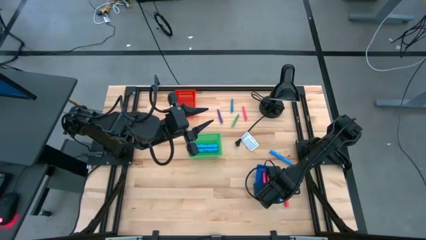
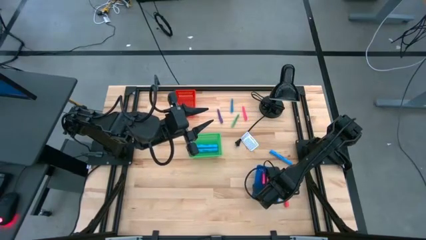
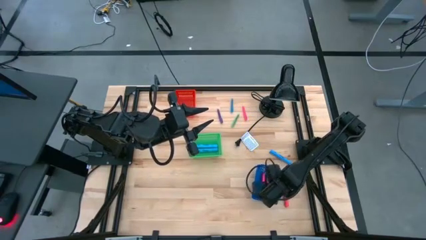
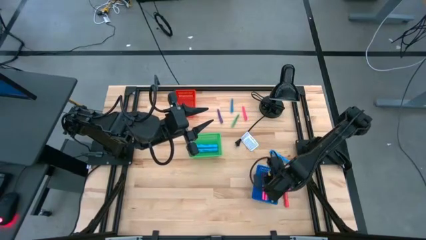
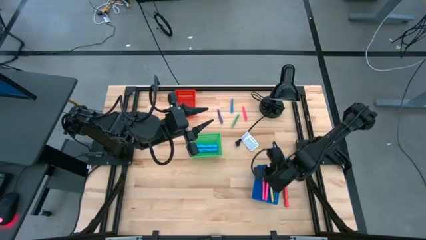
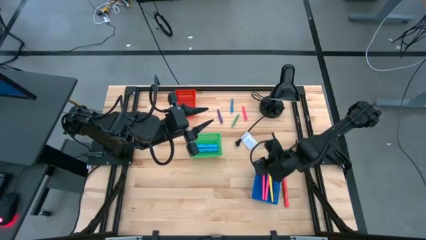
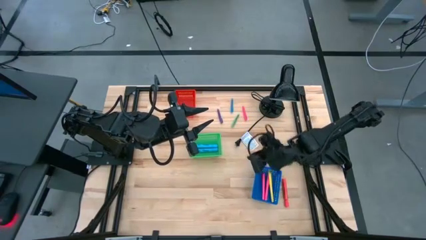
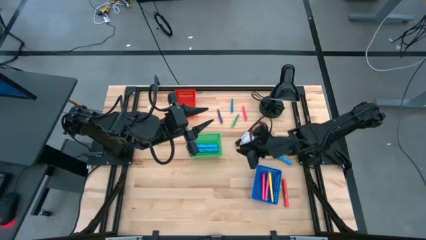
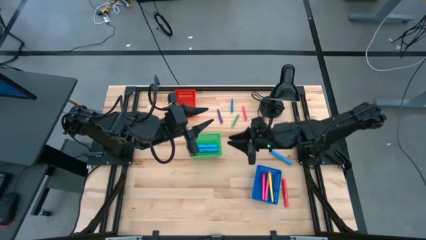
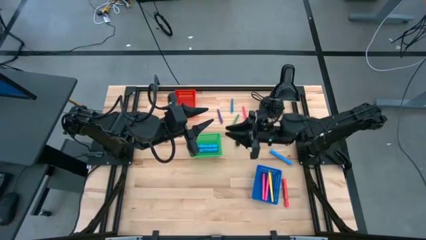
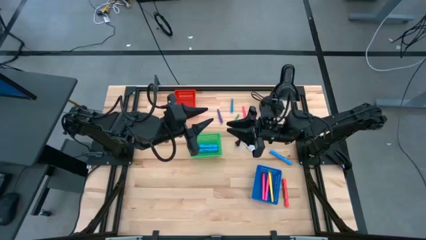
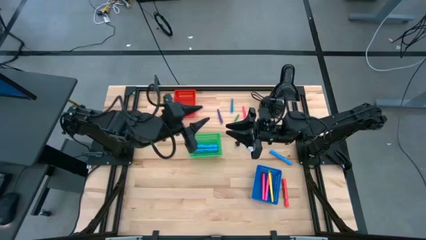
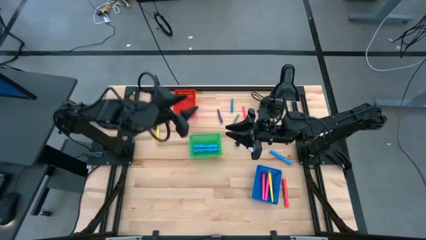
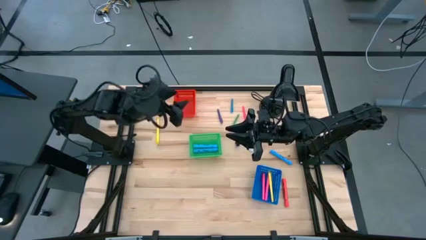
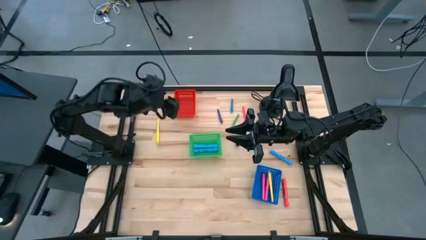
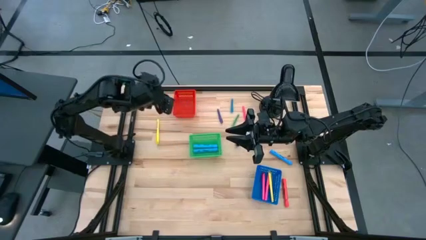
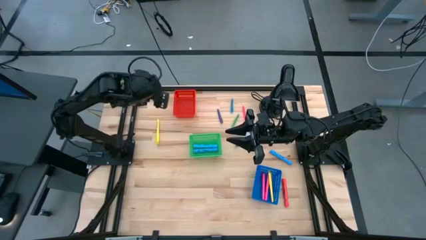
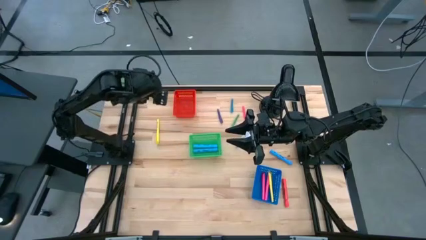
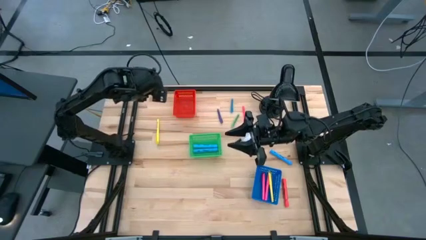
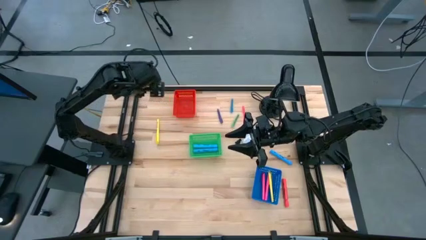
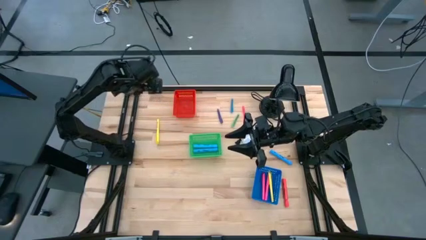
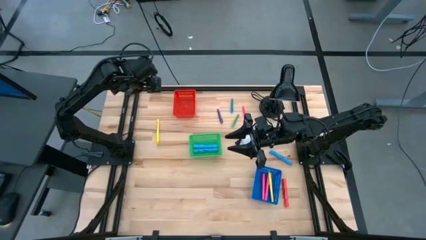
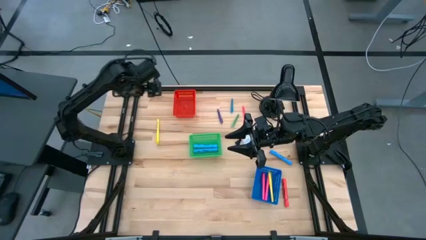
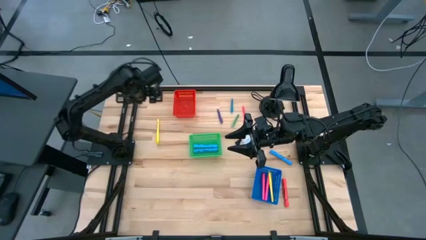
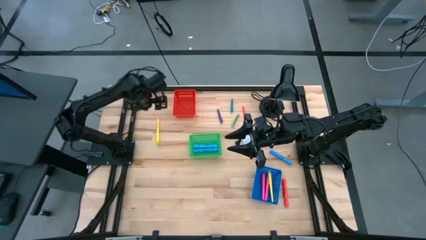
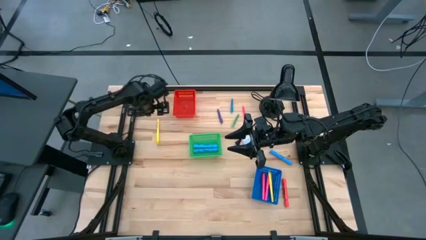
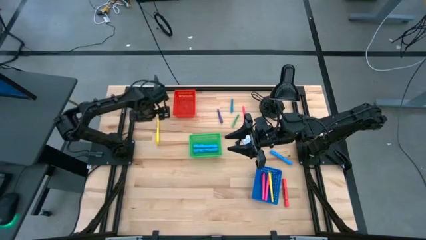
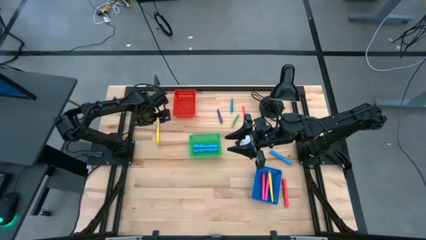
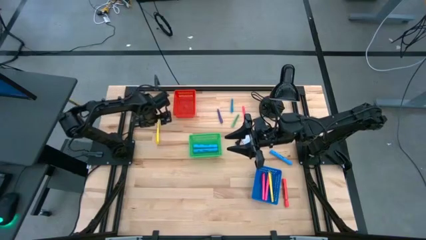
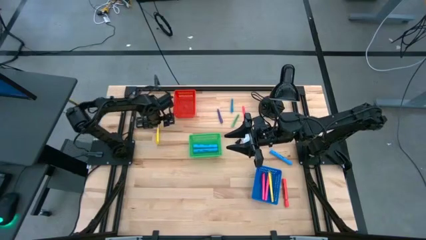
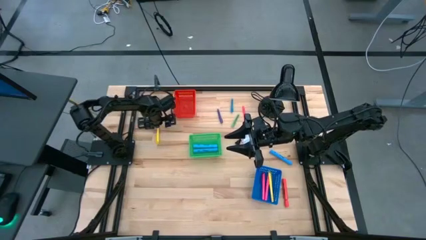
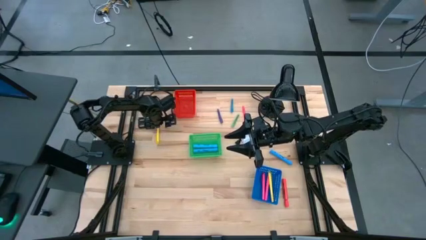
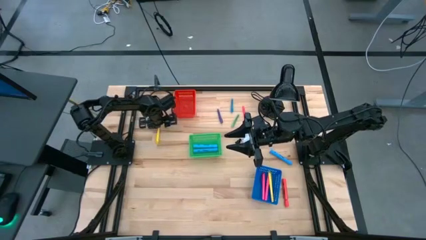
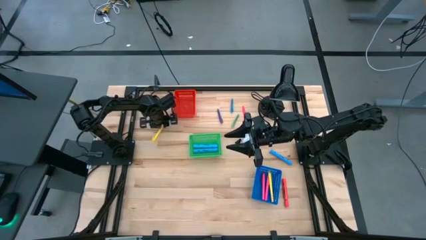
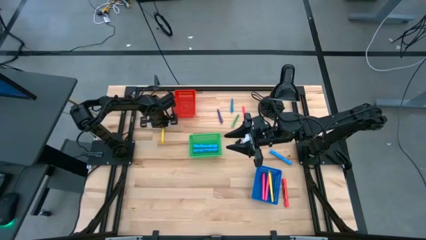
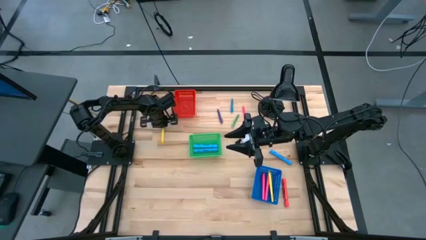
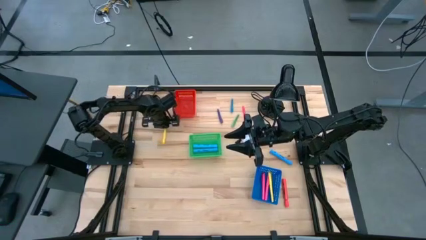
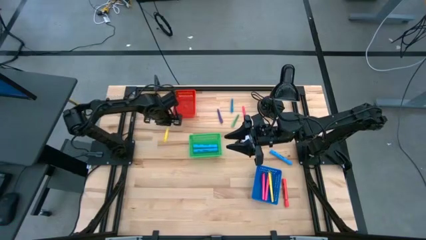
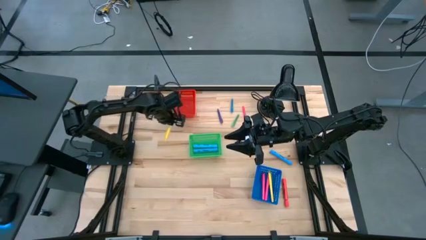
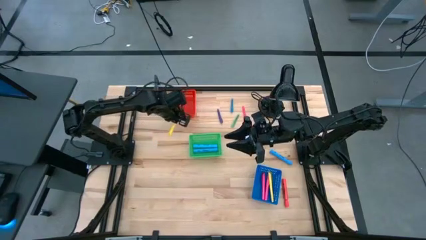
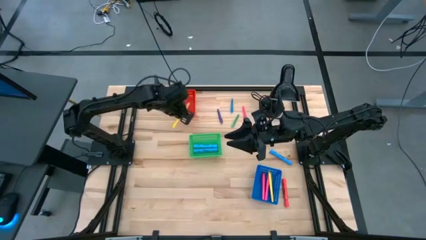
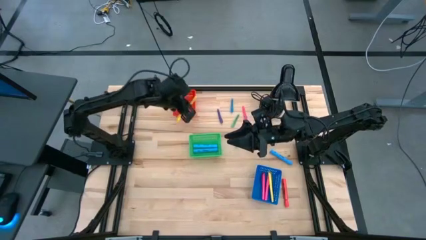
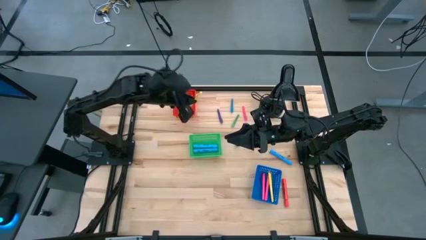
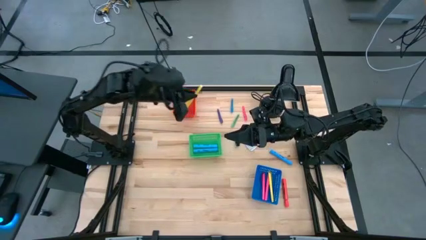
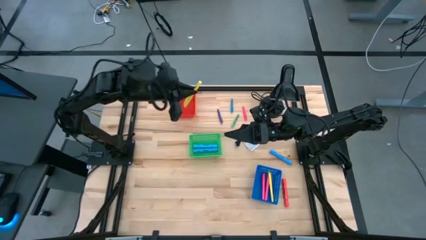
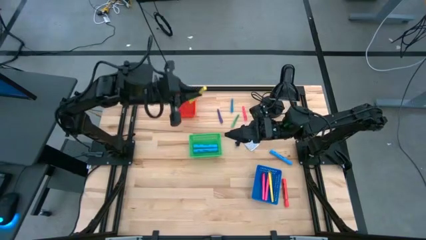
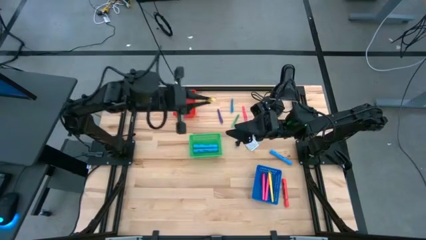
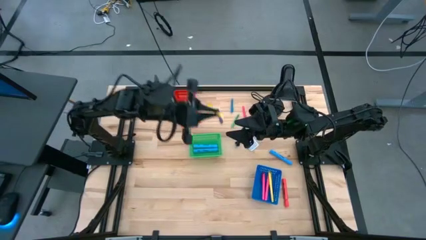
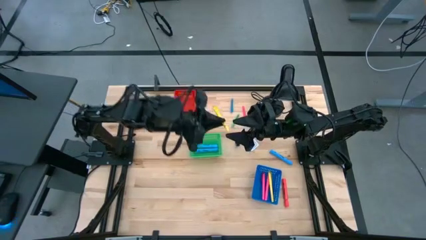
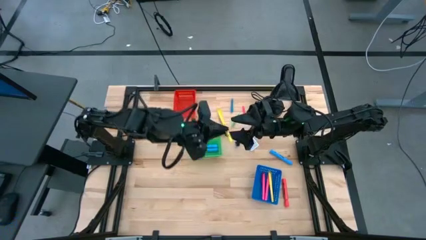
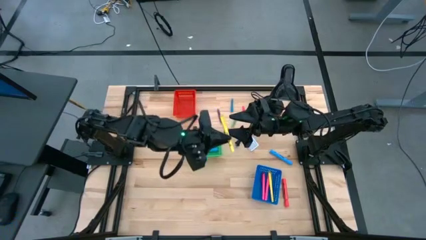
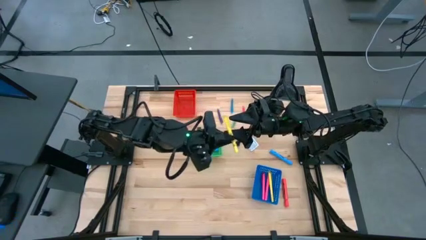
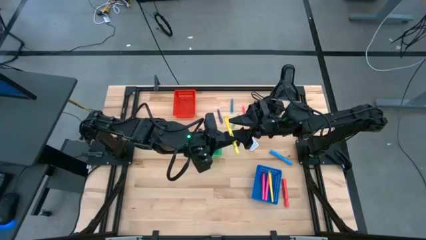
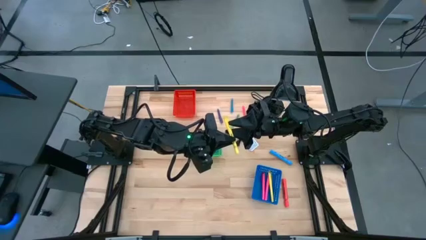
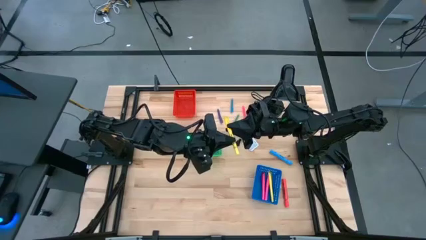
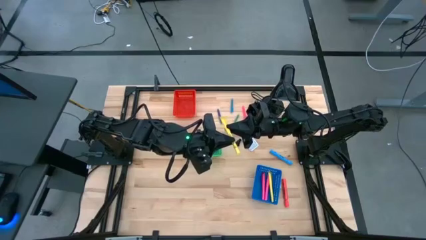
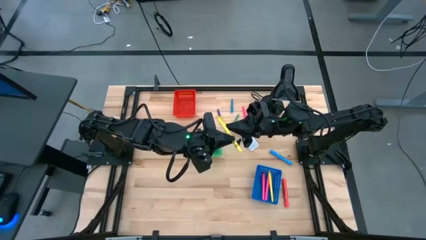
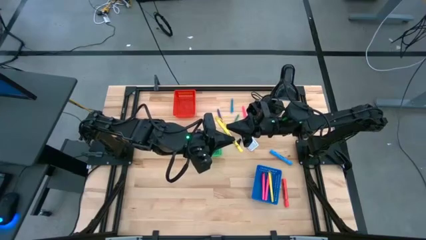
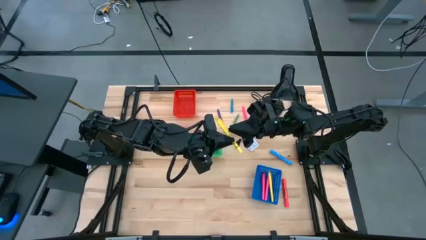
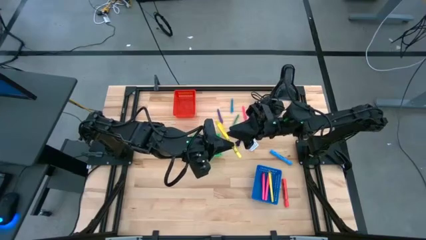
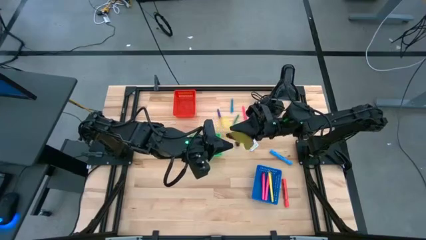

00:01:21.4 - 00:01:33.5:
Task: Pick & Place Markers
Put the large yellow pen into the blue bin

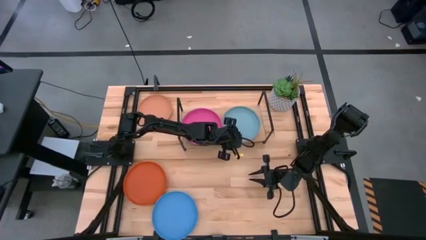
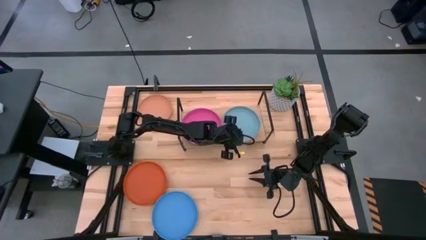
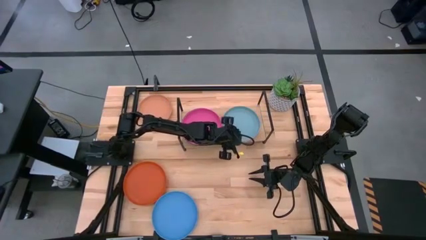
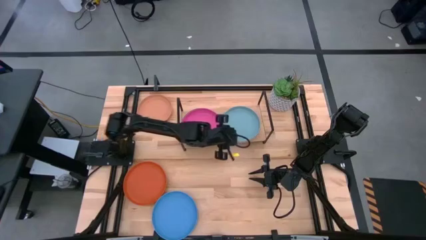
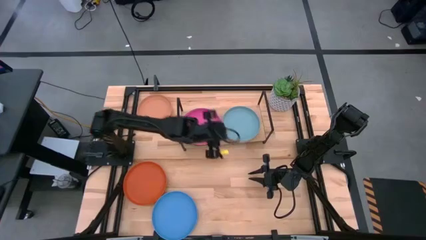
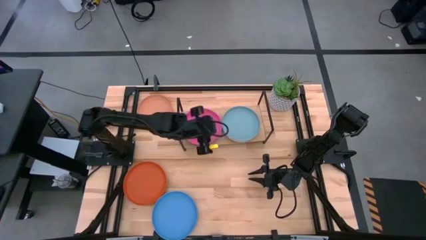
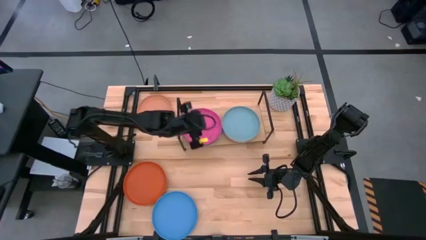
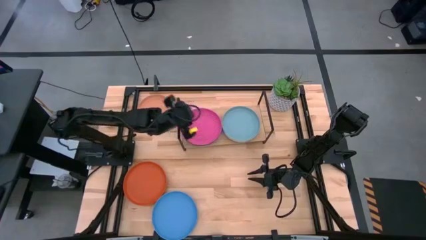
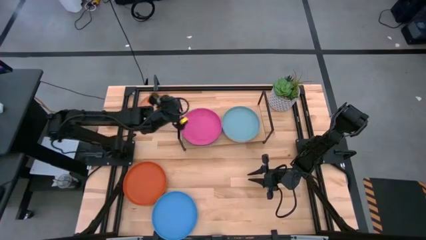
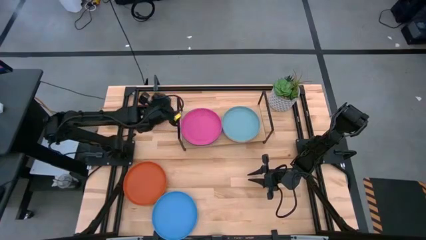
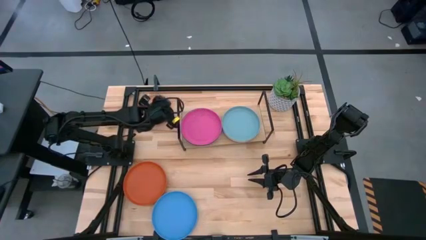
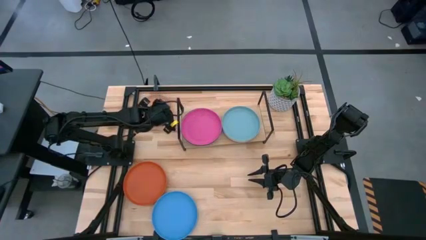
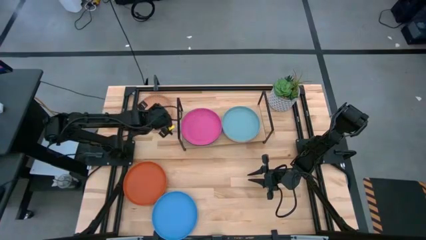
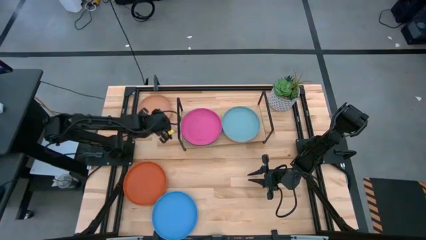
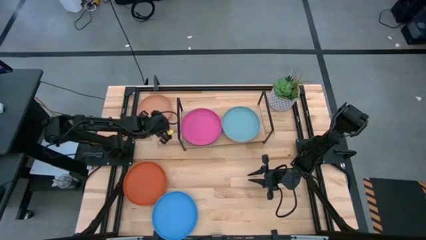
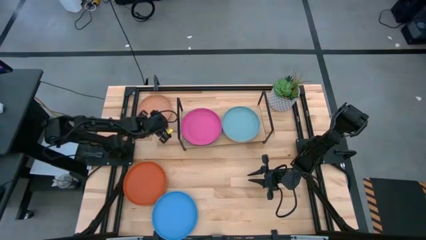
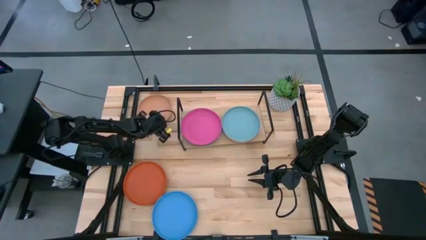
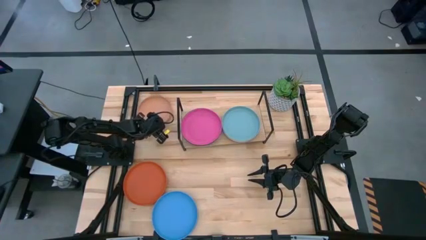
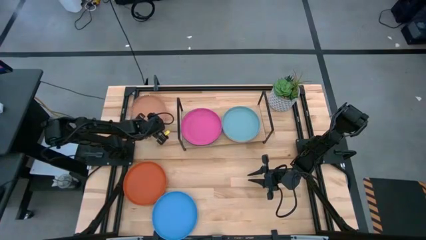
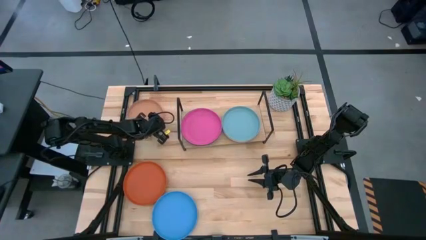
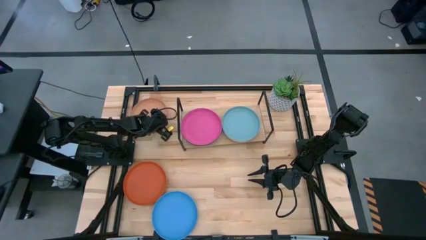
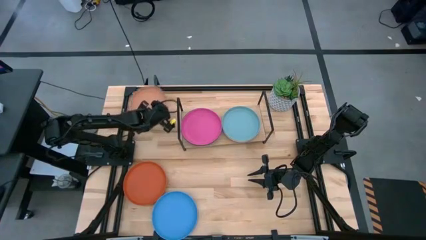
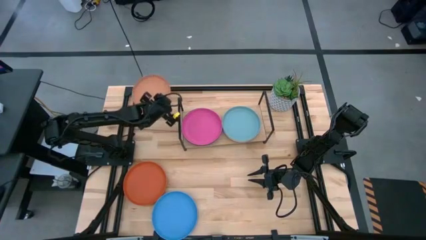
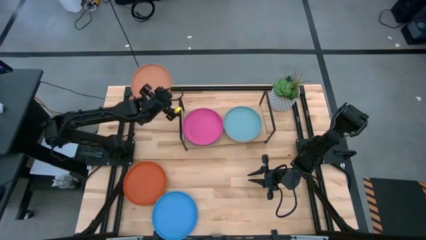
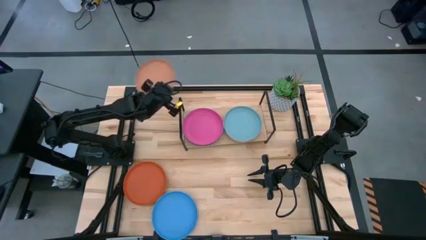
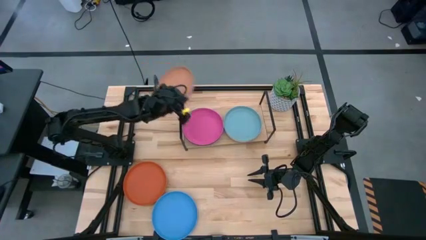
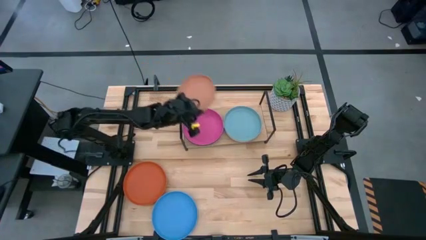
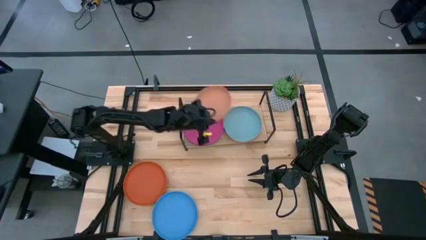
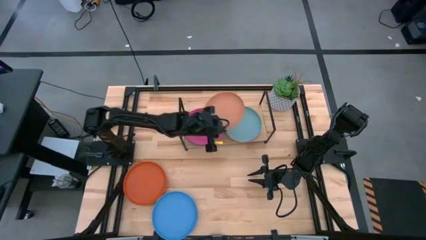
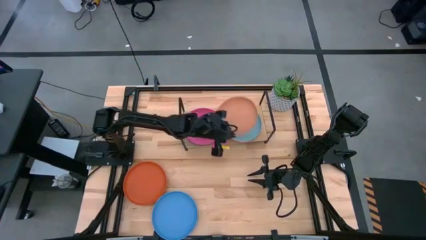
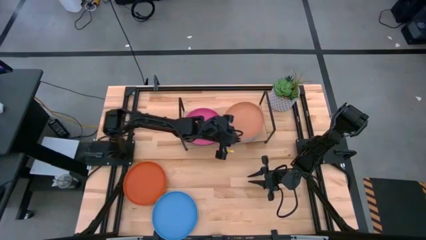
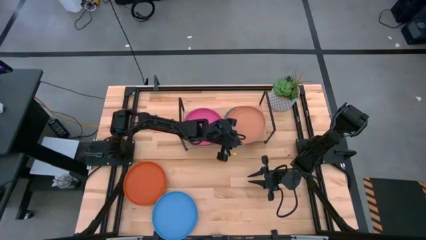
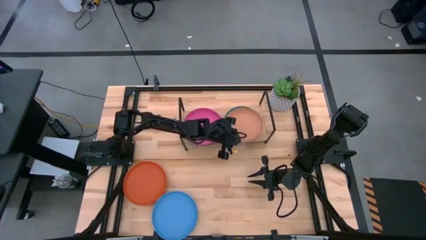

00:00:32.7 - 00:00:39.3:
Task: Place and stack plates onto a shelf
Stack the brown plate on top of the light blue plate on the shelf
